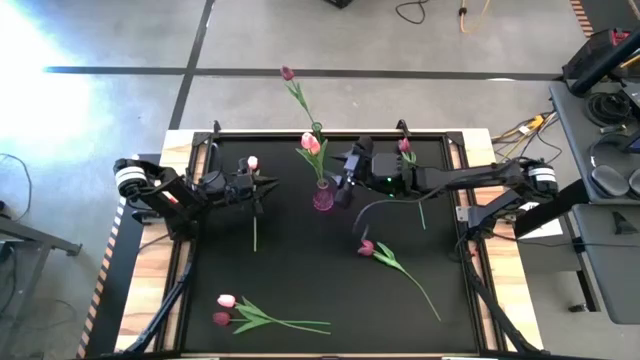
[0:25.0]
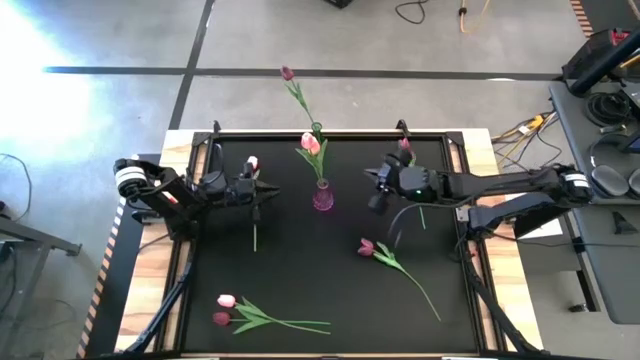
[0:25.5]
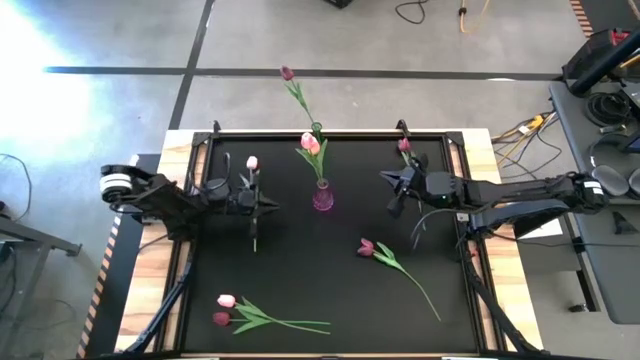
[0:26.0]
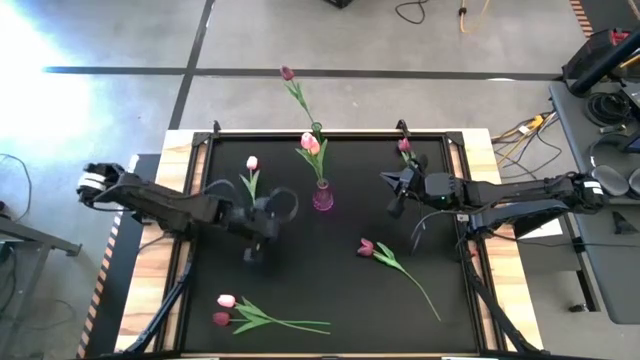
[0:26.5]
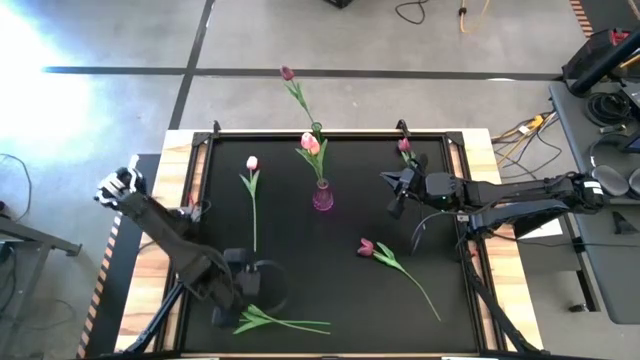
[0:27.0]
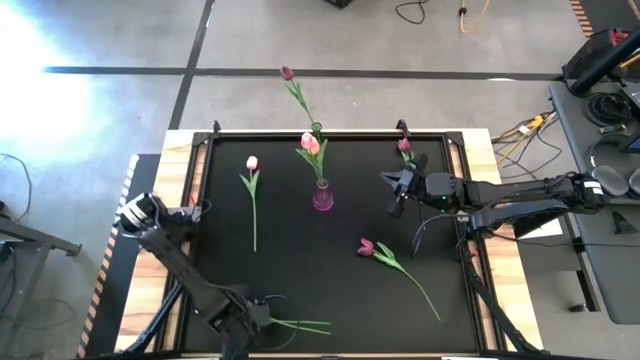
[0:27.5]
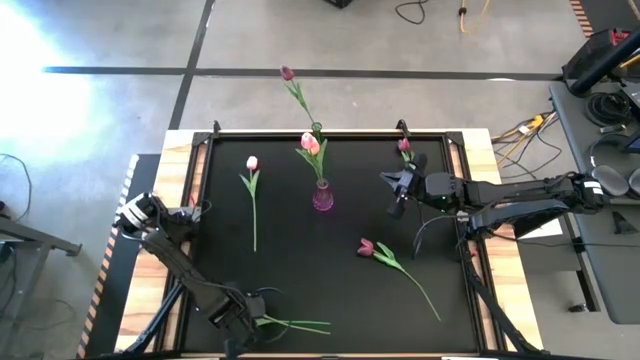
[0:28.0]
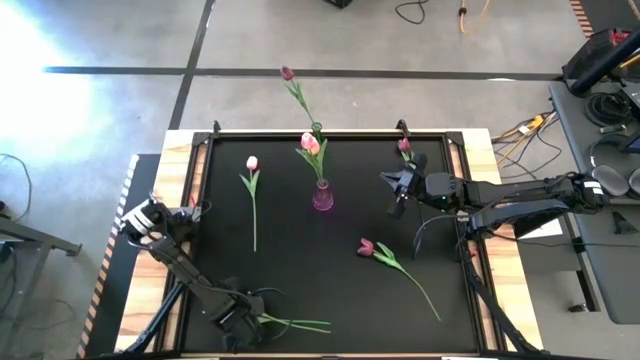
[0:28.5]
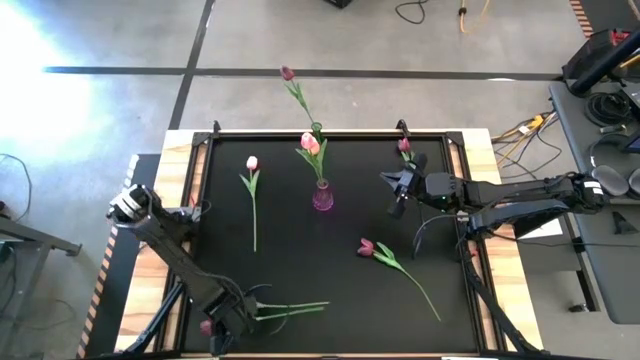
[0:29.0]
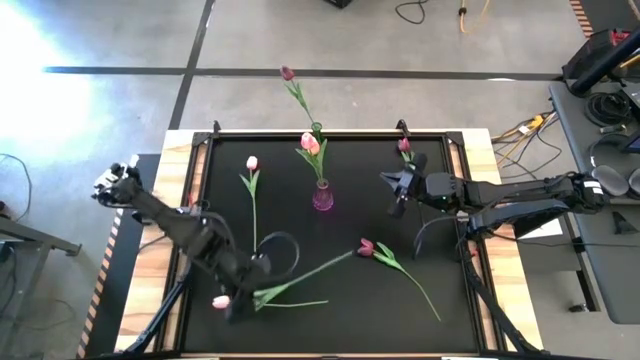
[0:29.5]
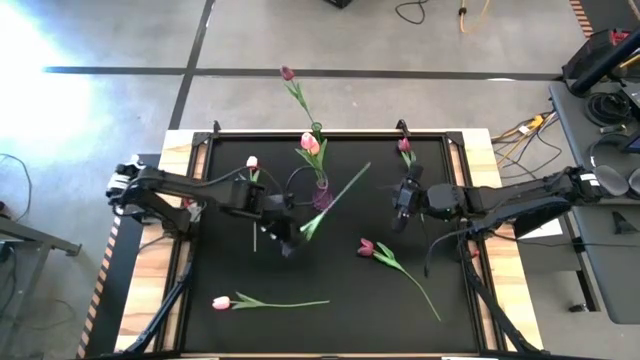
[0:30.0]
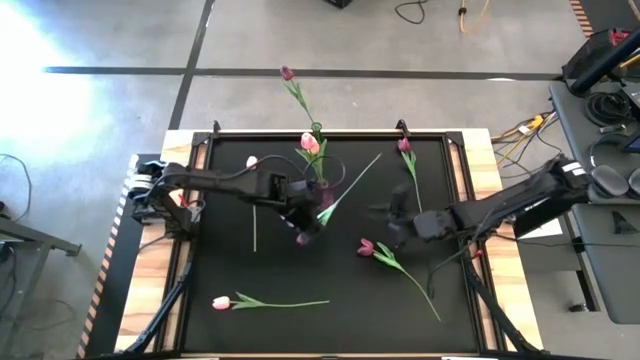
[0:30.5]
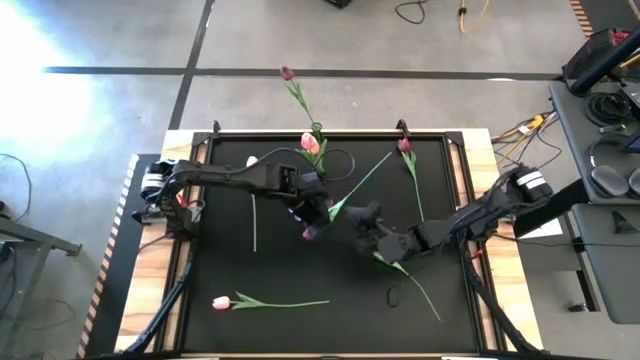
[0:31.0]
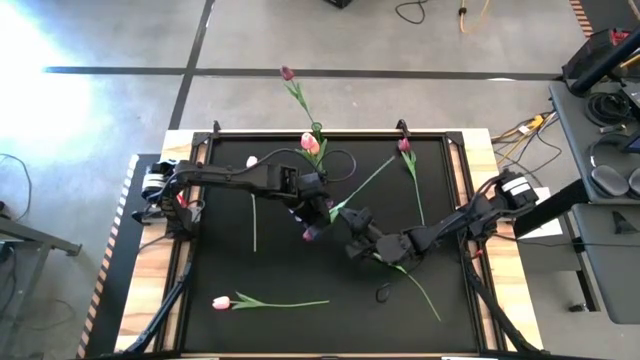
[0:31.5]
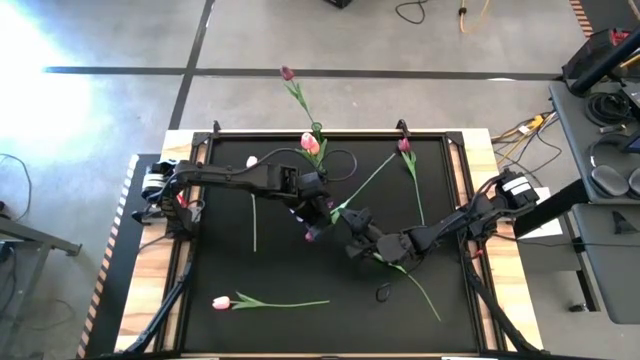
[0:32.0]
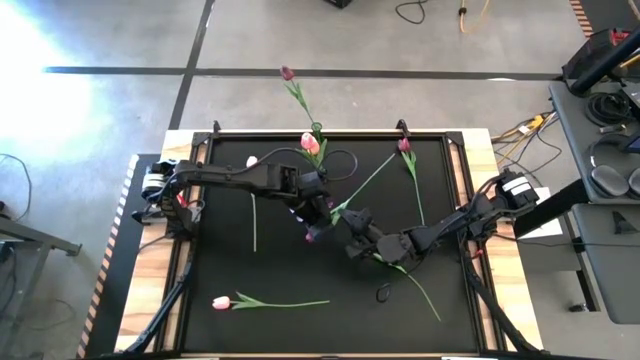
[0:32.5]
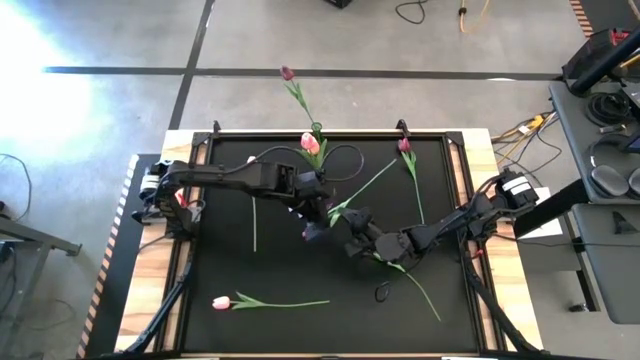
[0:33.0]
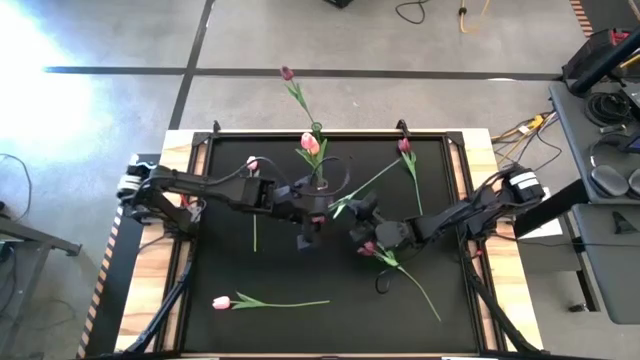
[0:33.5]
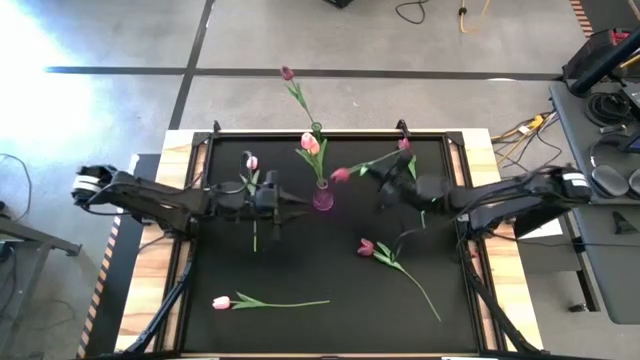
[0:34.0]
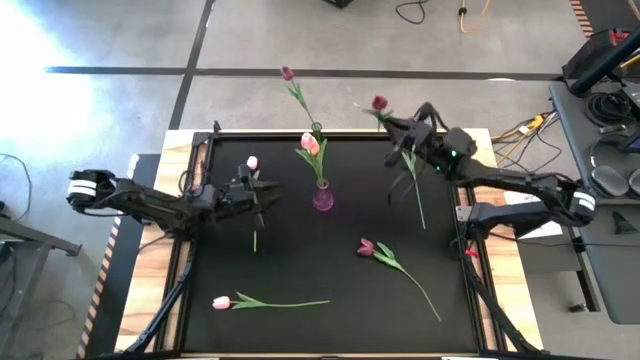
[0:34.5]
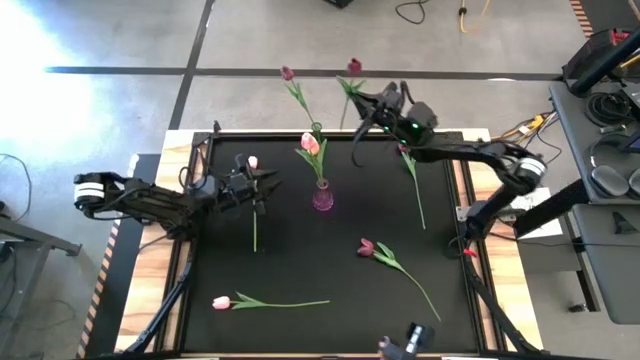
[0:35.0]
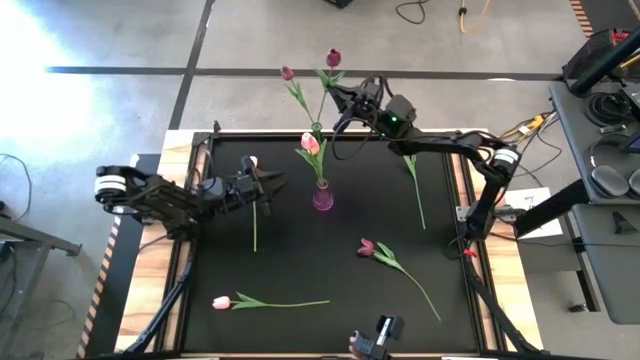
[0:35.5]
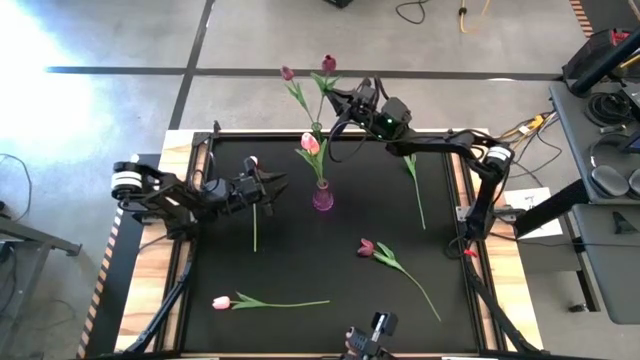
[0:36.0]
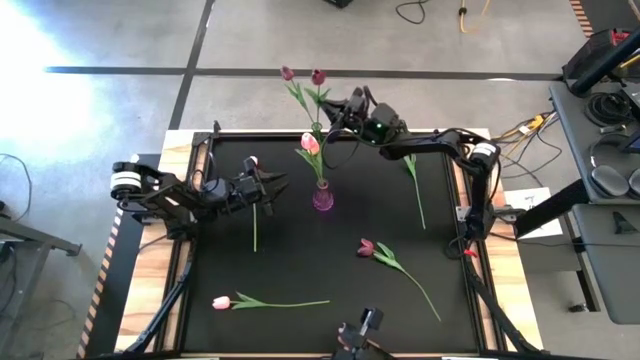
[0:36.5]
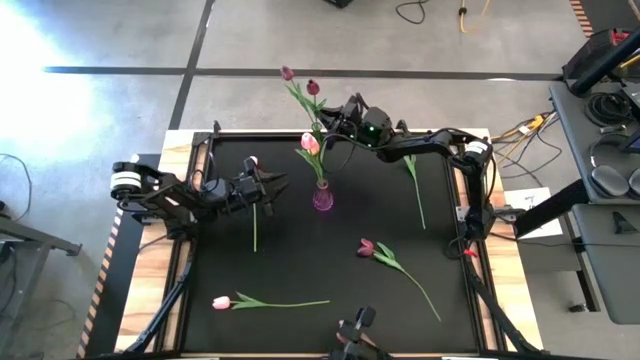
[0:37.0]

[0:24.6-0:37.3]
Task: Sort flowers into vase by color
Put the red flower into the green vase

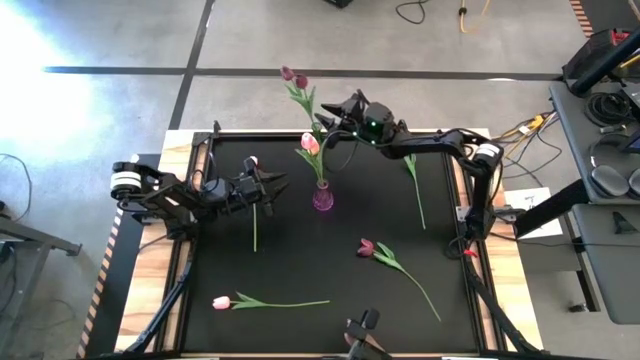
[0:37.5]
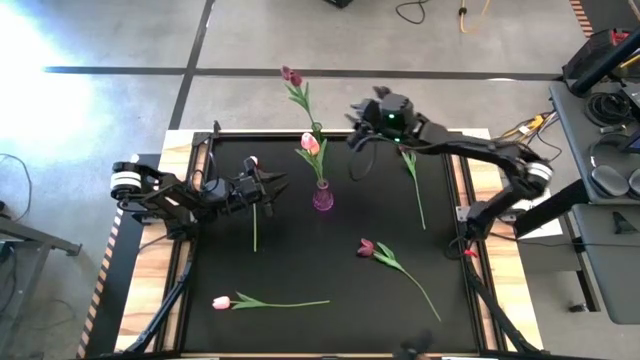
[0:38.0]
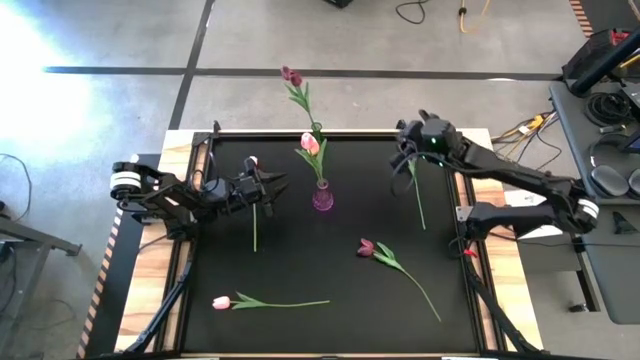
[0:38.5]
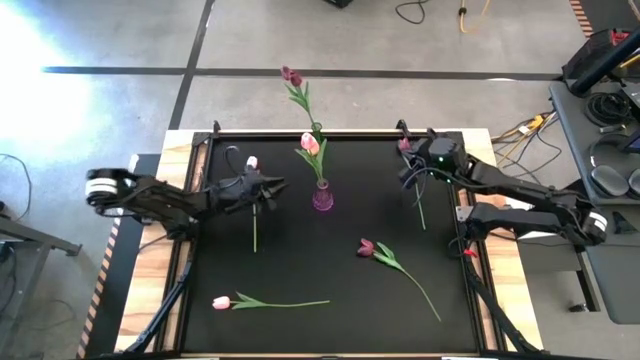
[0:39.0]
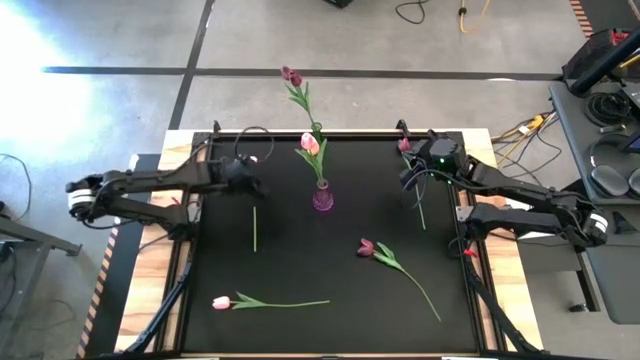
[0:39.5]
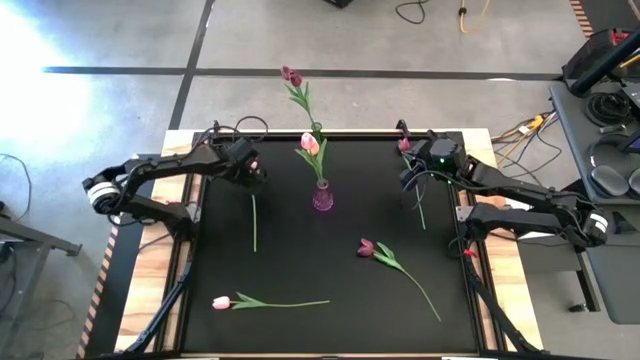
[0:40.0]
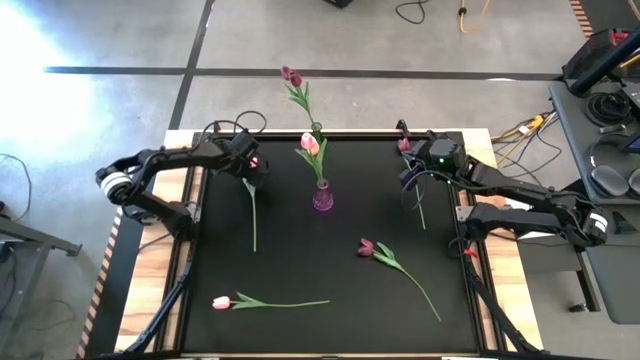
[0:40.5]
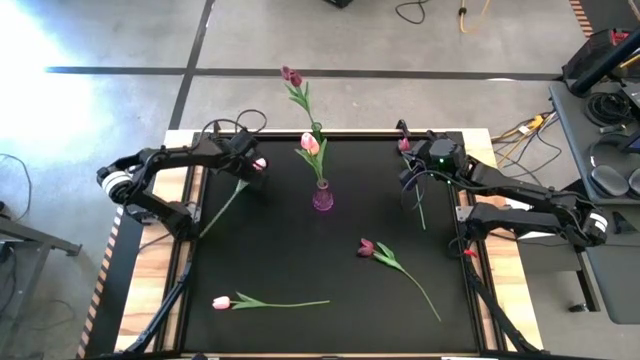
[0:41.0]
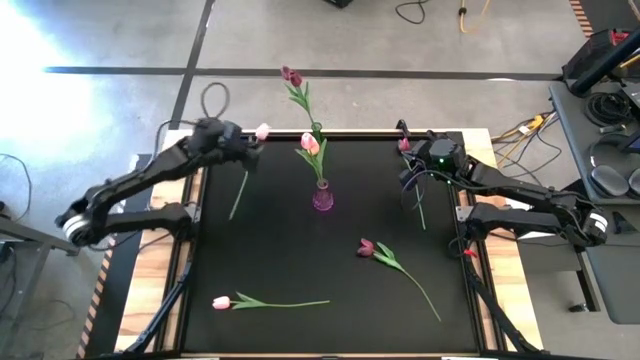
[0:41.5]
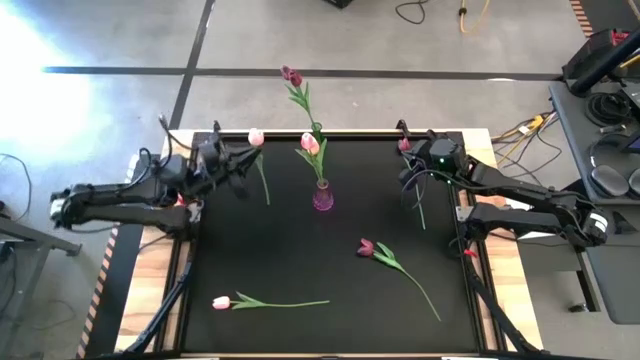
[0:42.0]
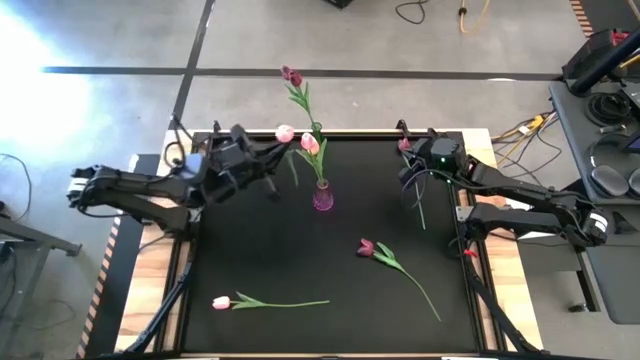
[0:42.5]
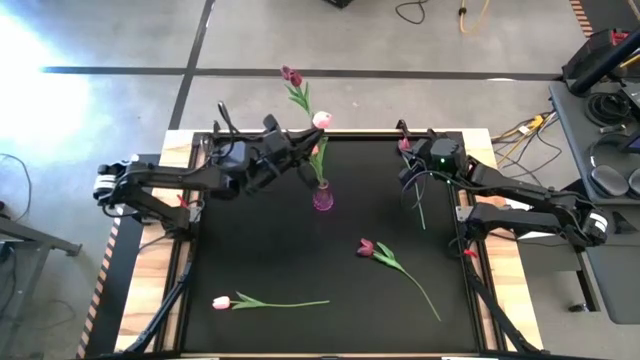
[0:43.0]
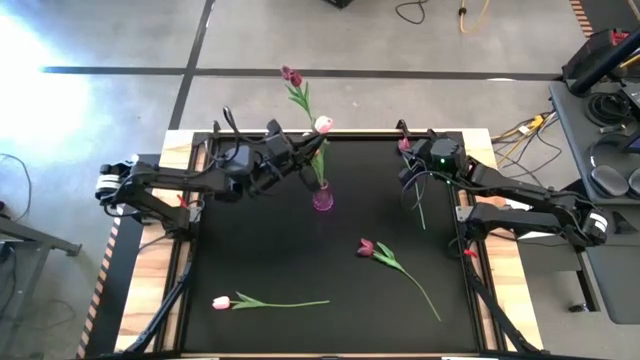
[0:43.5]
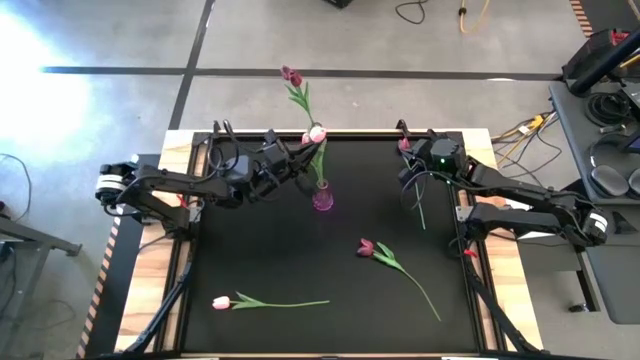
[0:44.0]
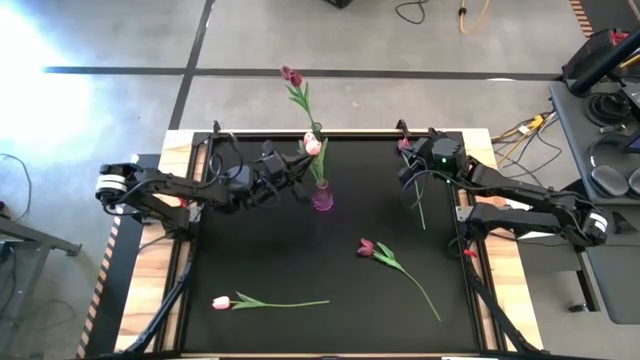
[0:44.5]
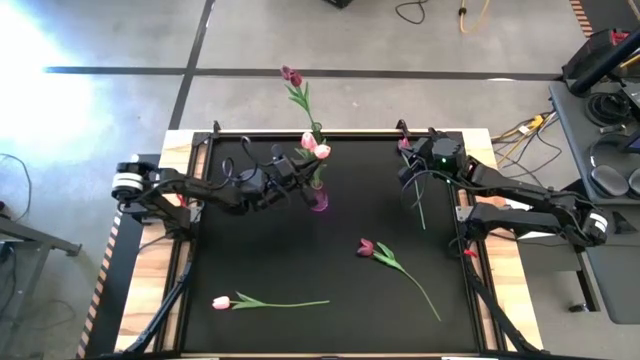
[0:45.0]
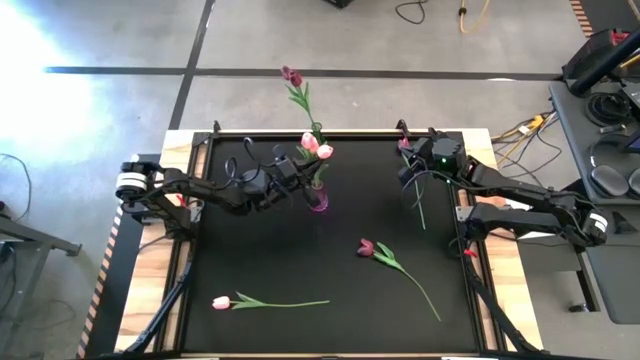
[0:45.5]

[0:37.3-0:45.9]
Put the purple flower into the purple vase
